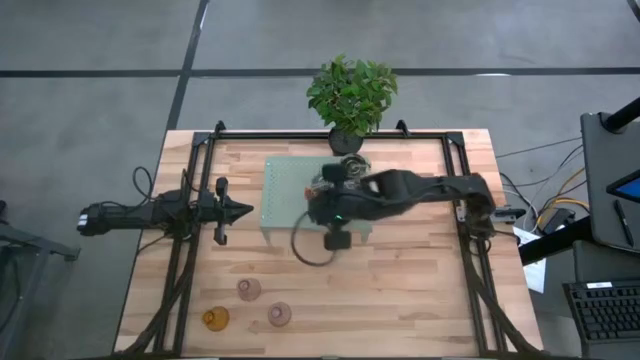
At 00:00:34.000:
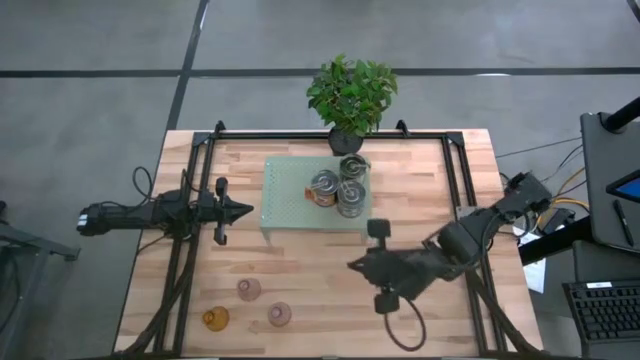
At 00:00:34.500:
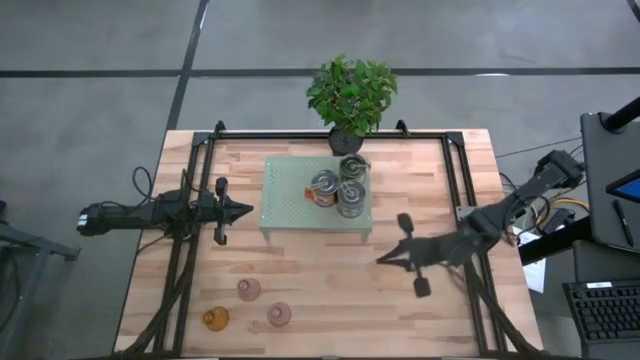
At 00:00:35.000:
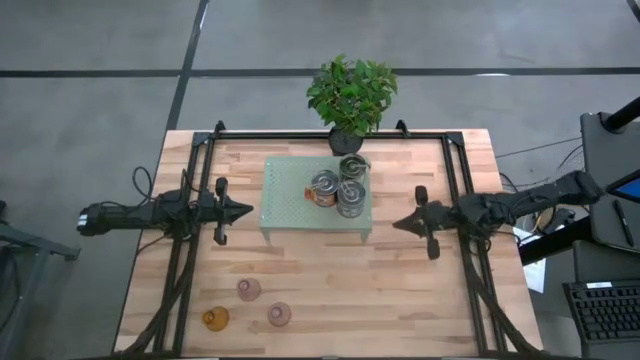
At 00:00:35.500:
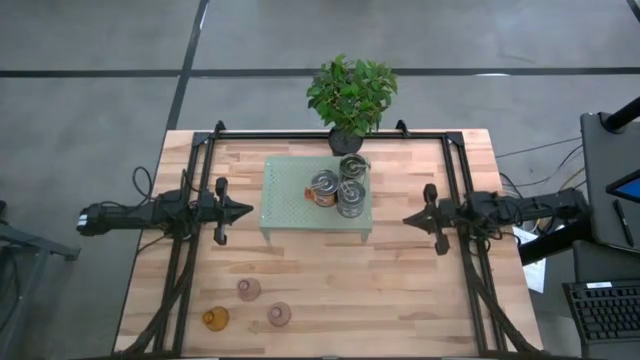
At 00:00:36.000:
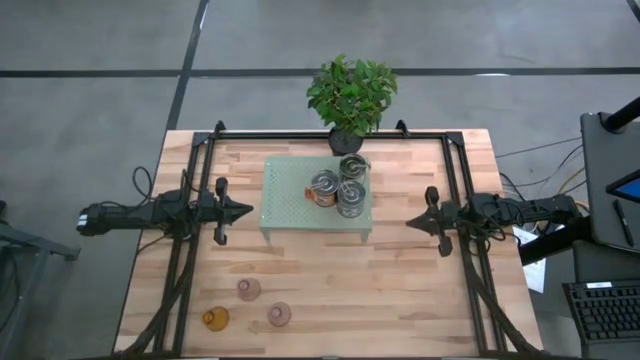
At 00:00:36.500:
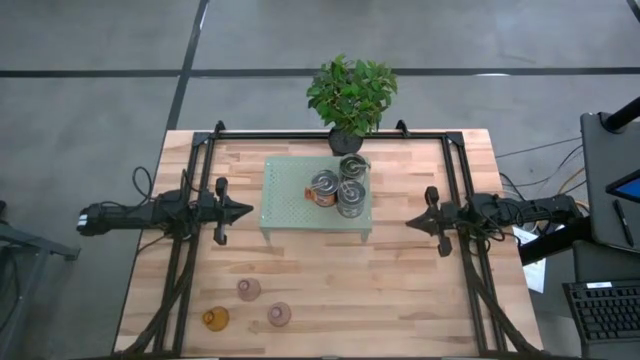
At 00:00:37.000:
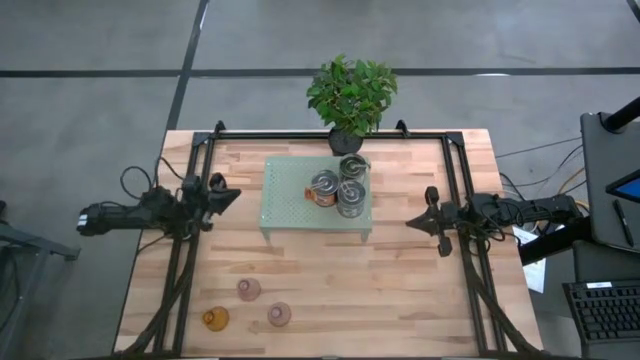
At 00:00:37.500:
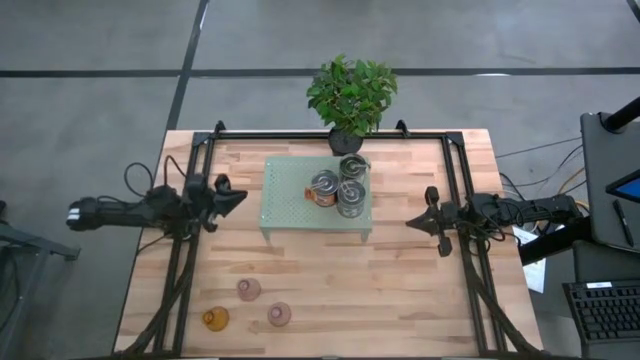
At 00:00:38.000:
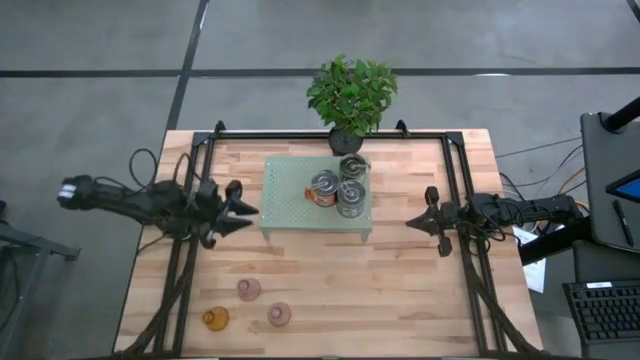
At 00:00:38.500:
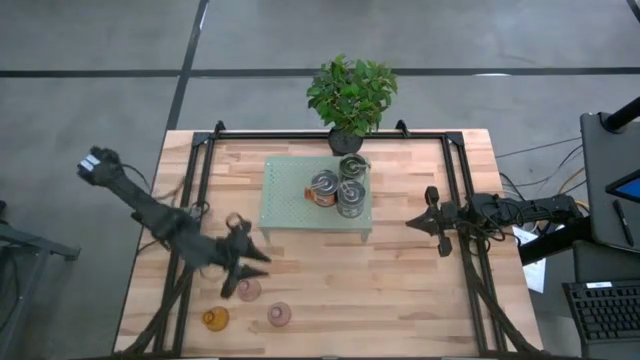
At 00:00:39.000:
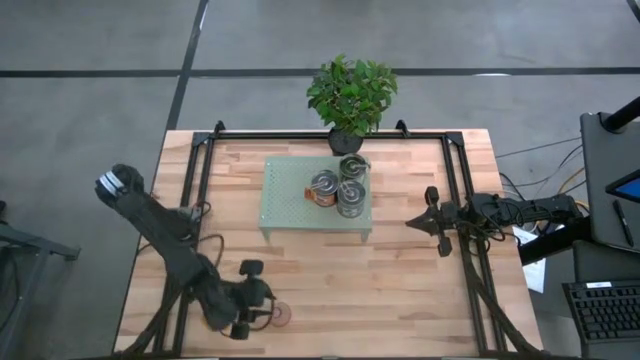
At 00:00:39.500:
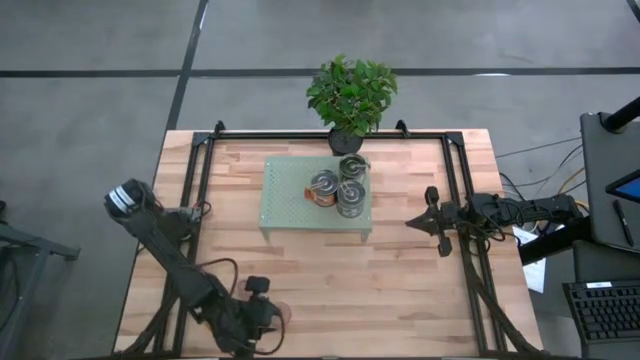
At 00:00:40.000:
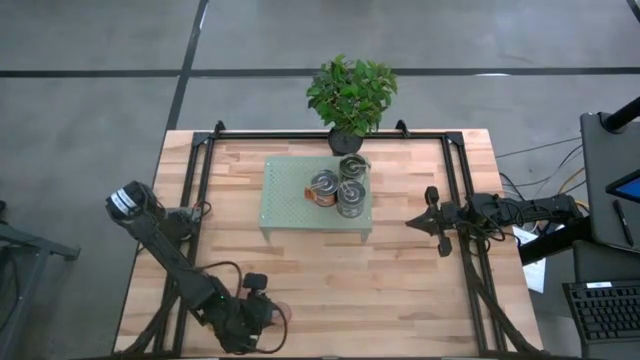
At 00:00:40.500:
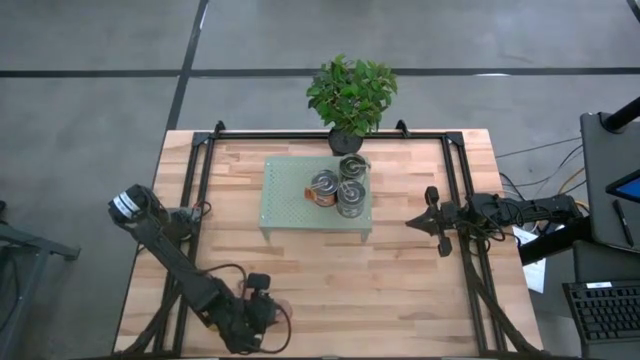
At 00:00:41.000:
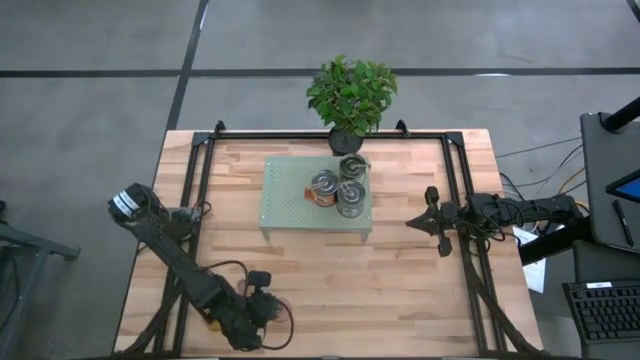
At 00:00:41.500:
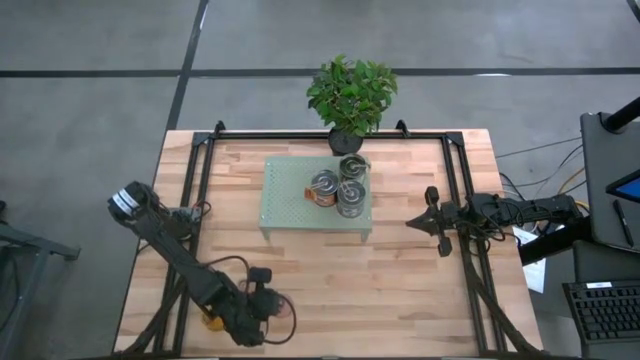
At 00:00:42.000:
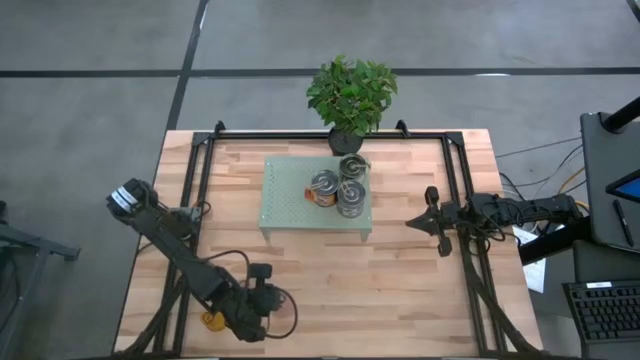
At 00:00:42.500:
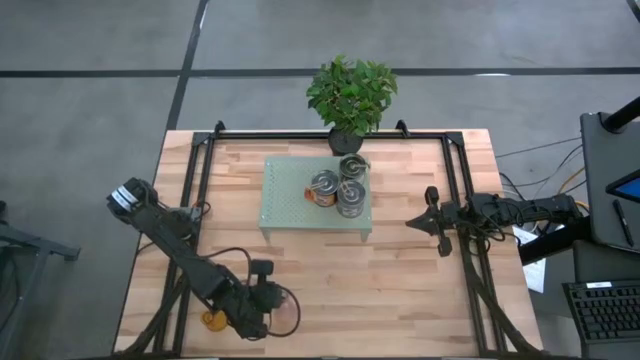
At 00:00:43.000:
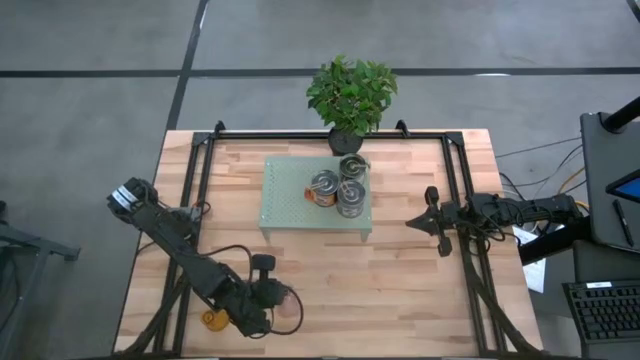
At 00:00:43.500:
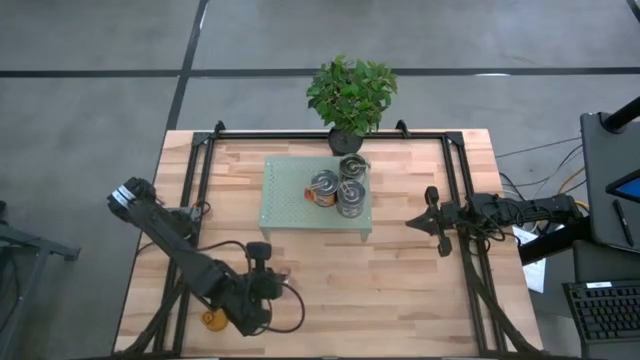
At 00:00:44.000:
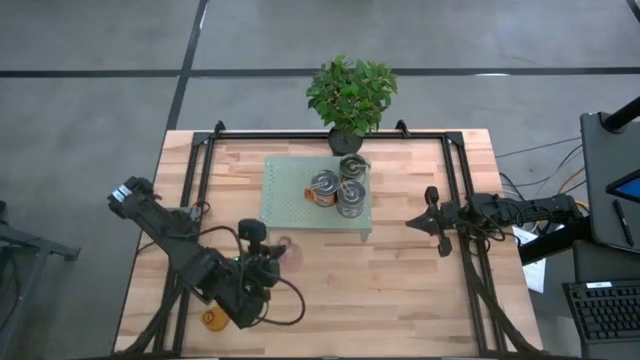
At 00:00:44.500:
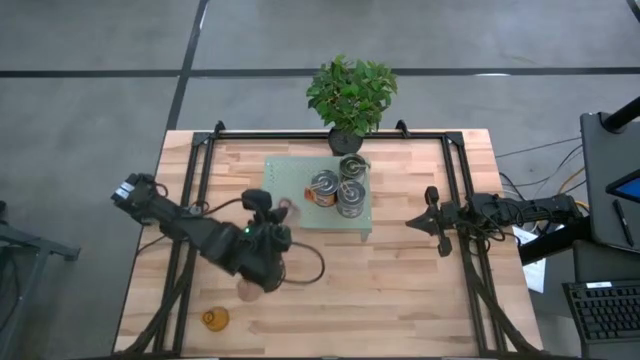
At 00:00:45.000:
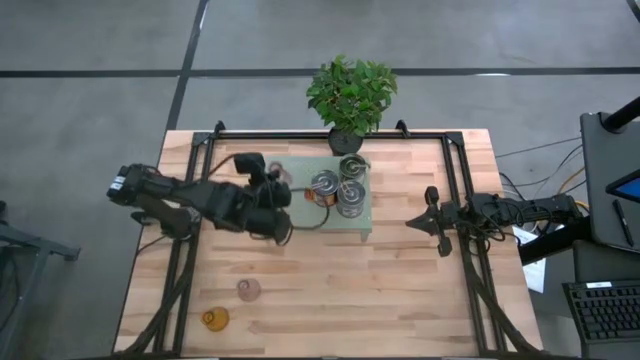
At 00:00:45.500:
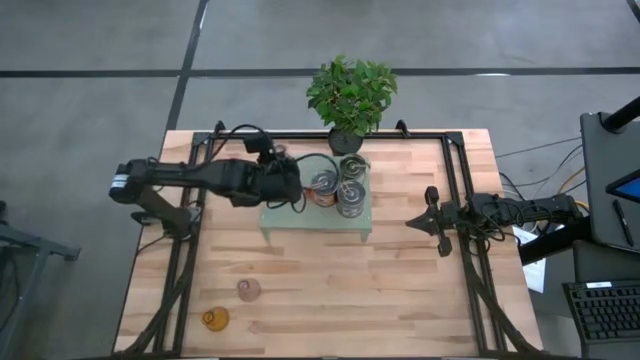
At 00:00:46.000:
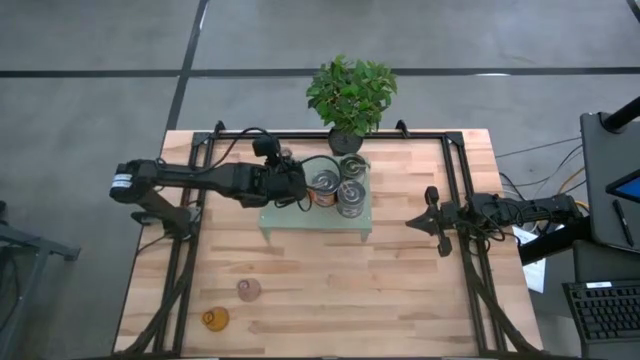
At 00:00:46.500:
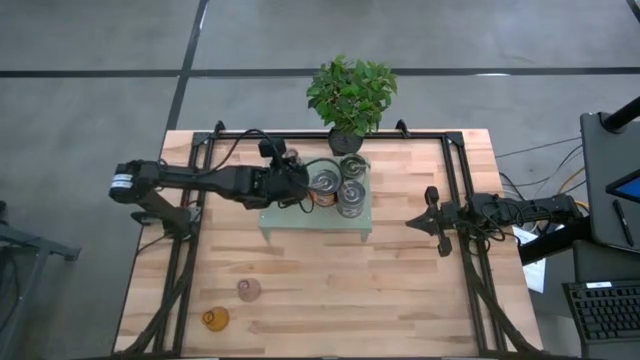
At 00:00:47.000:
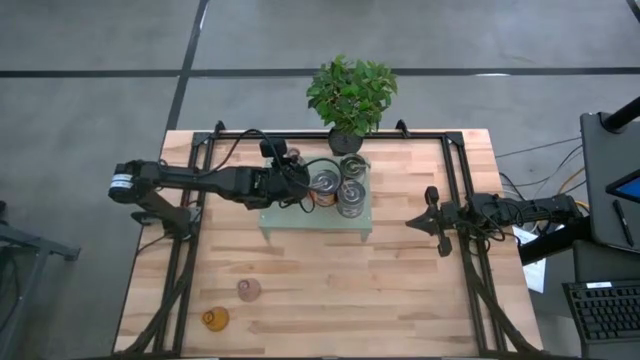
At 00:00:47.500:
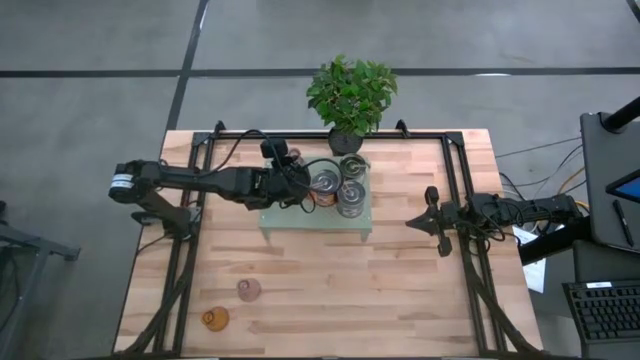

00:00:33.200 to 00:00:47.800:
Task: Pick & Place candle stick holders
Put the pink glass candle holder on the shelf

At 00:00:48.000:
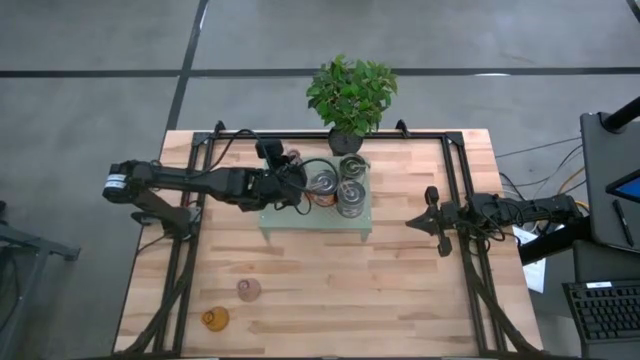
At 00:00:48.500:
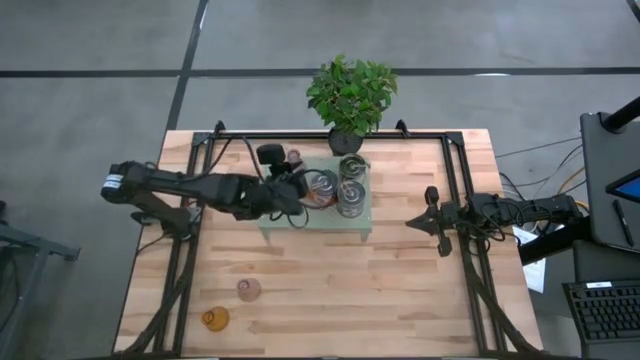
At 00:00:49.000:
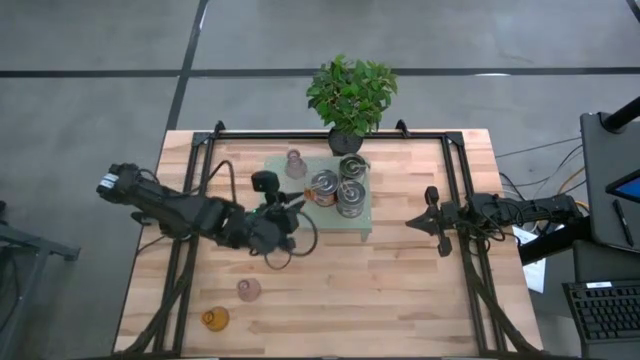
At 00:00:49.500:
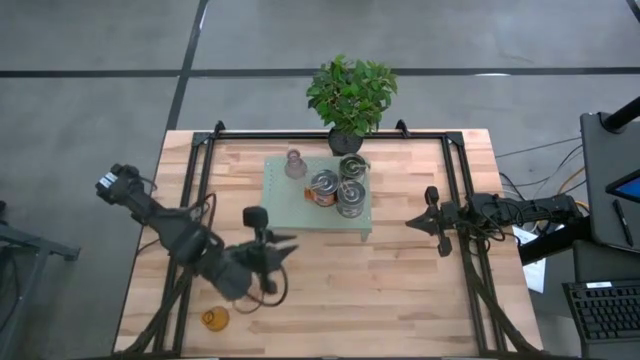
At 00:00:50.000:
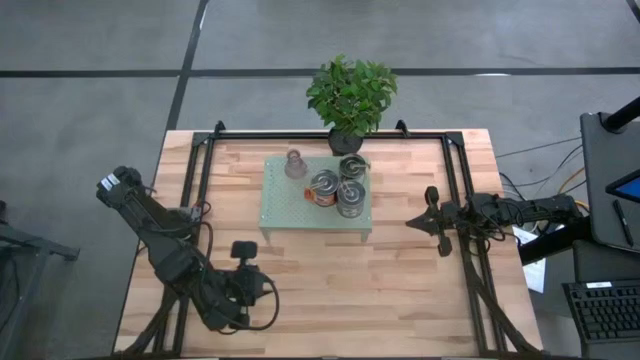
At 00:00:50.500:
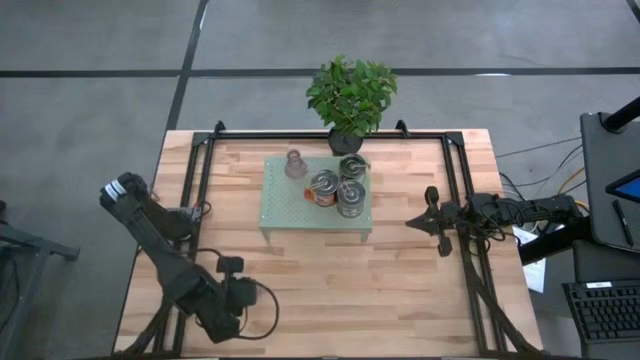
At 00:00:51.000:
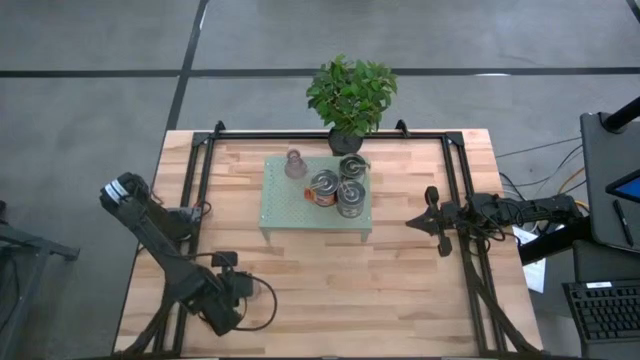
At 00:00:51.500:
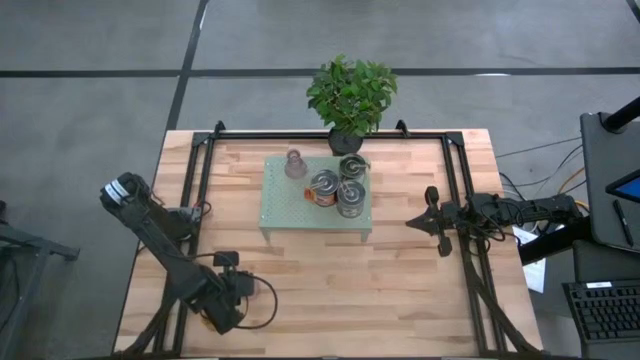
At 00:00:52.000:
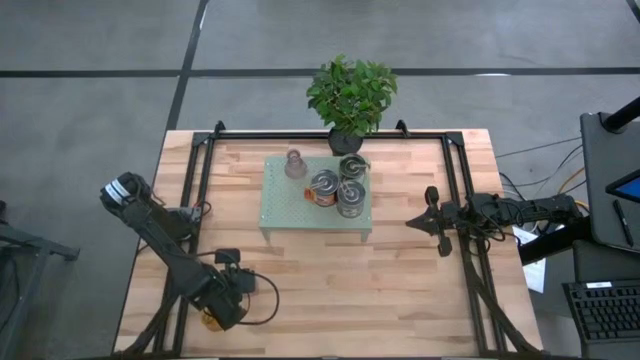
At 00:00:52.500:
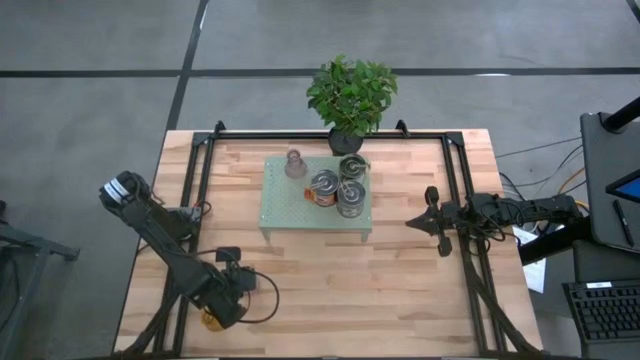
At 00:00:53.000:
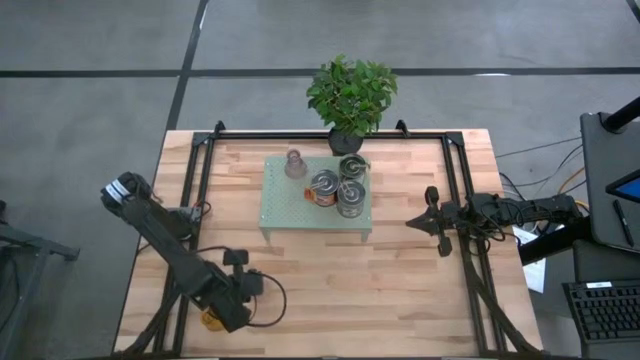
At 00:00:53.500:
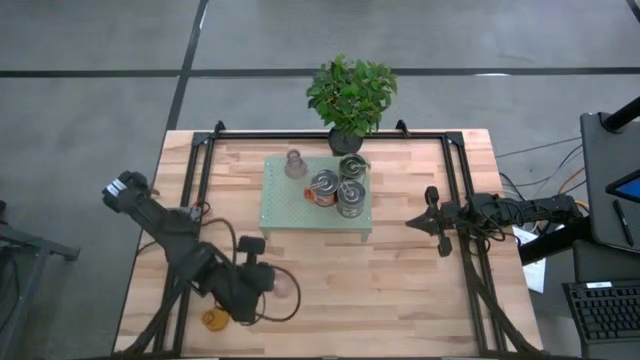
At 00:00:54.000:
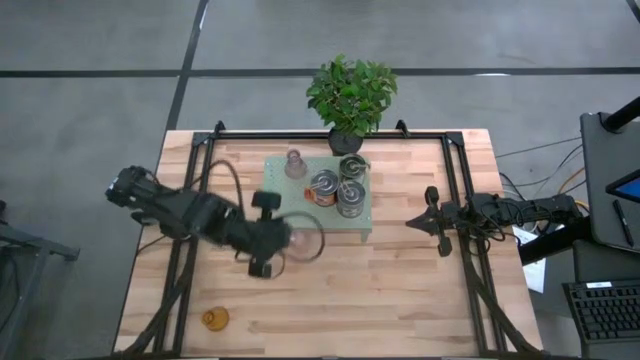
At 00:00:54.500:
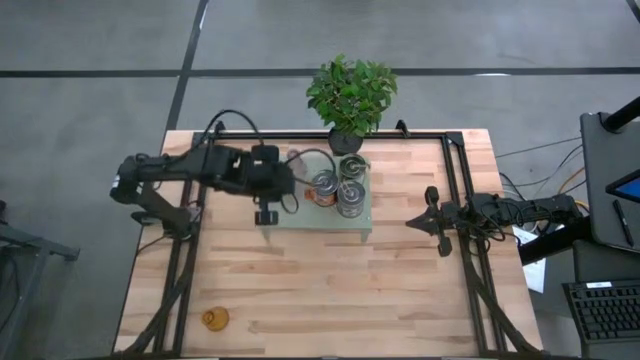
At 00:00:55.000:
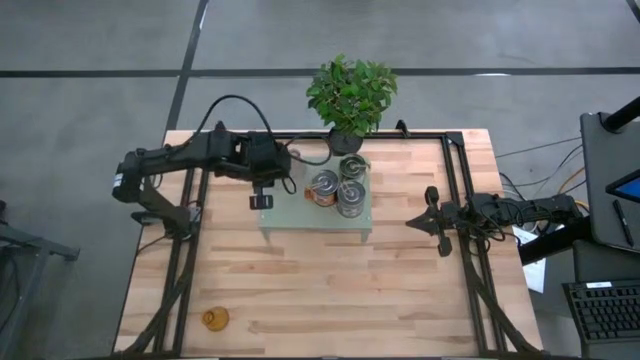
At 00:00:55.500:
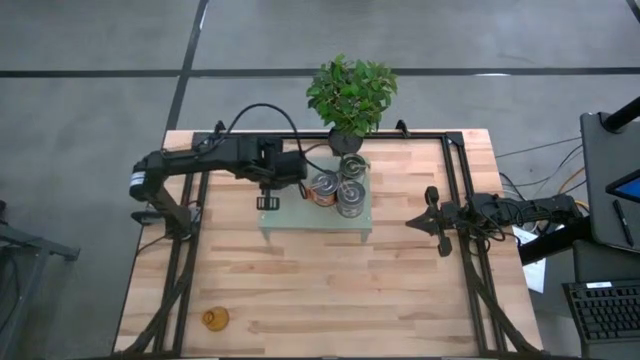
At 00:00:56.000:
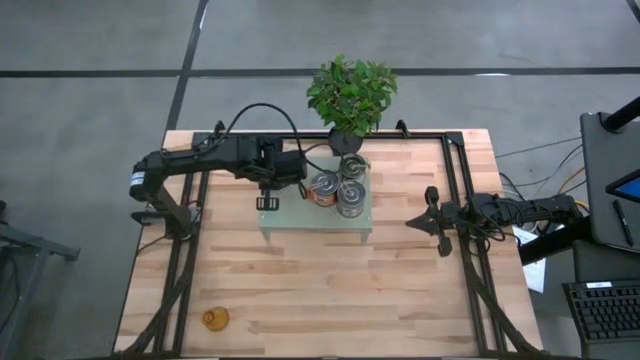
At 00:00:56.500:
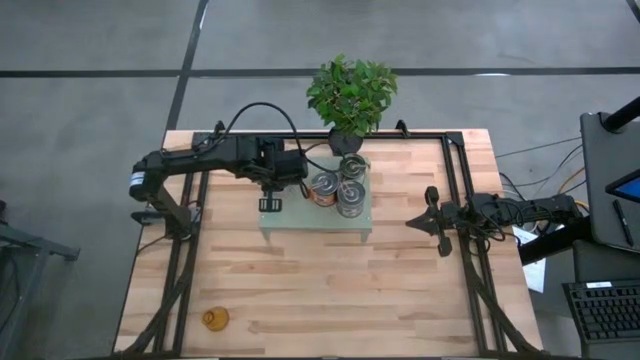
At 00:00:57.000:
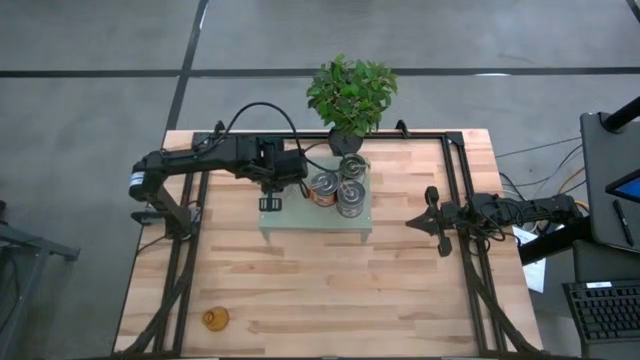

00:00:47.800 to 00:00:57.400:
Put the pink glass candle holder on the shelf
